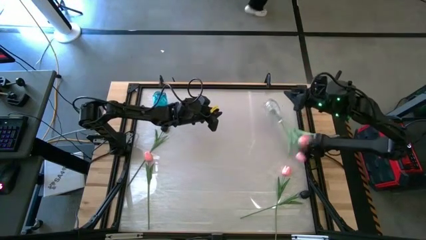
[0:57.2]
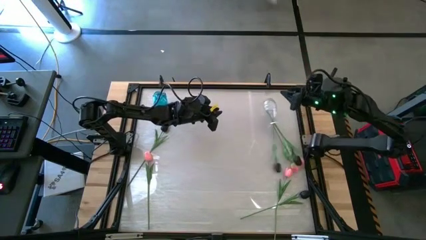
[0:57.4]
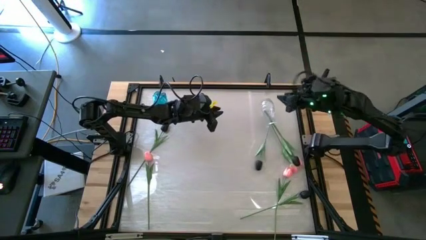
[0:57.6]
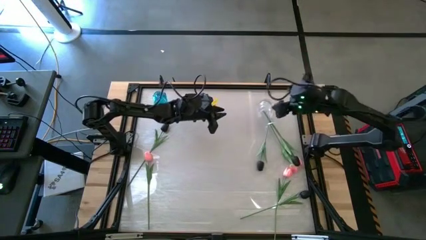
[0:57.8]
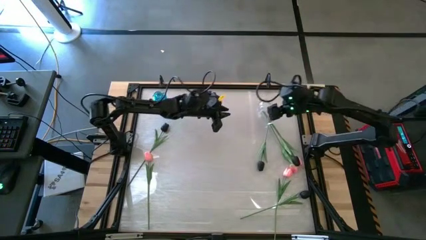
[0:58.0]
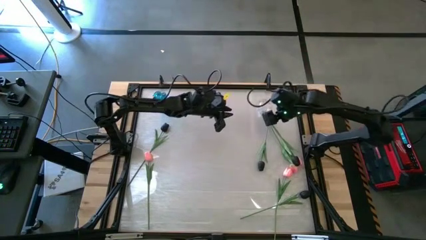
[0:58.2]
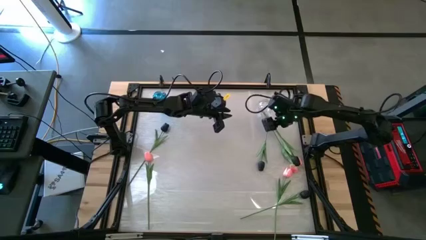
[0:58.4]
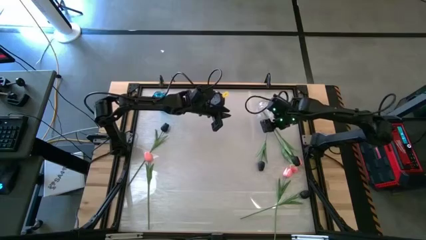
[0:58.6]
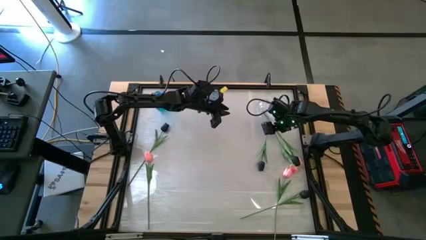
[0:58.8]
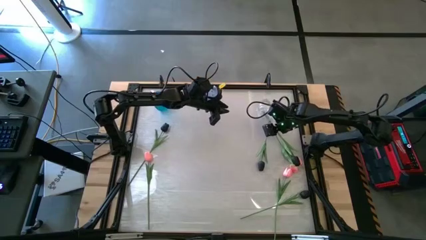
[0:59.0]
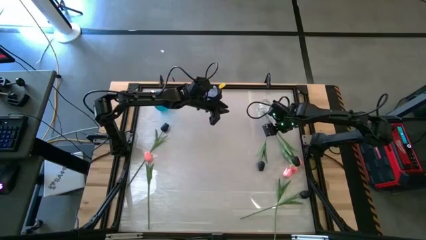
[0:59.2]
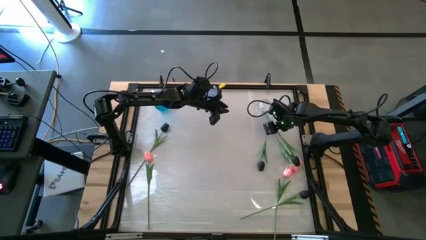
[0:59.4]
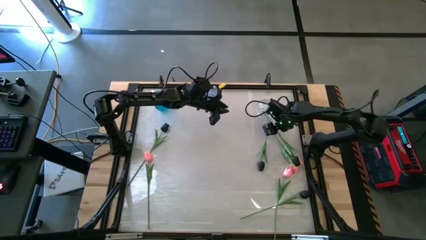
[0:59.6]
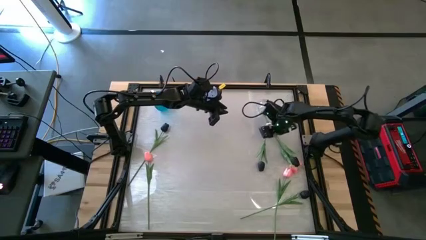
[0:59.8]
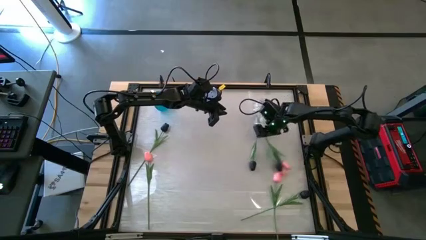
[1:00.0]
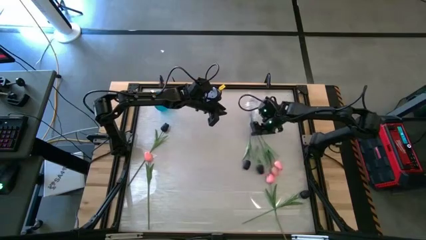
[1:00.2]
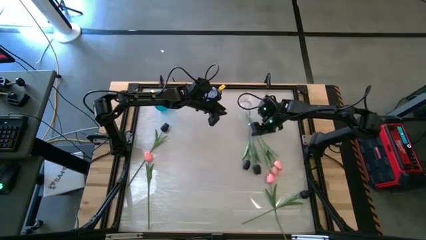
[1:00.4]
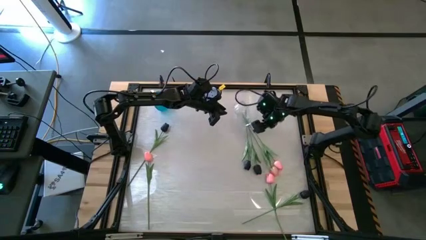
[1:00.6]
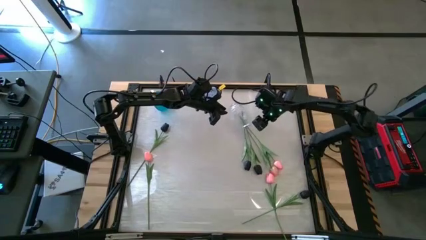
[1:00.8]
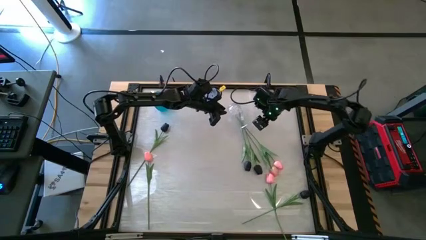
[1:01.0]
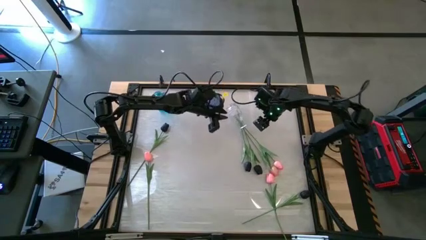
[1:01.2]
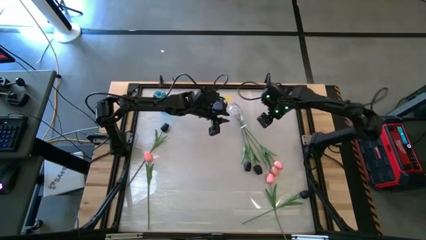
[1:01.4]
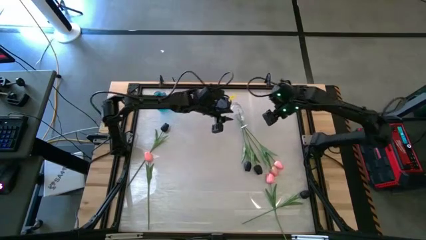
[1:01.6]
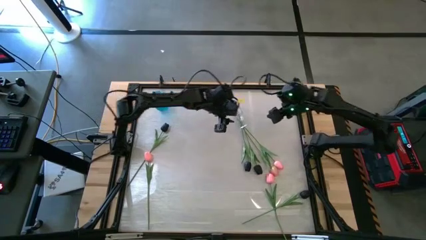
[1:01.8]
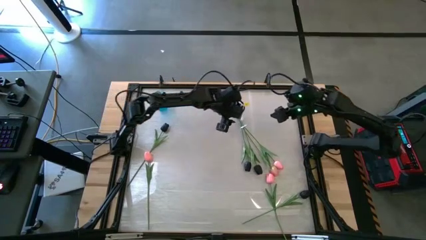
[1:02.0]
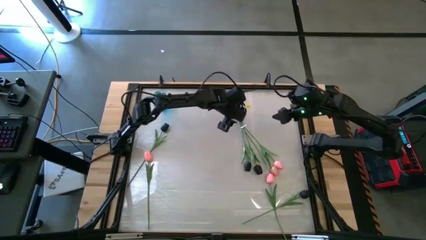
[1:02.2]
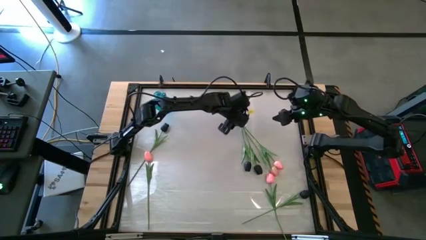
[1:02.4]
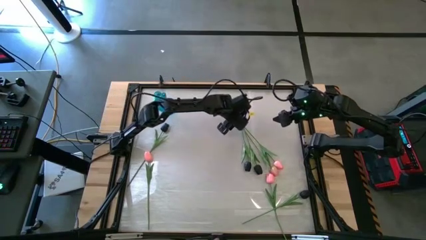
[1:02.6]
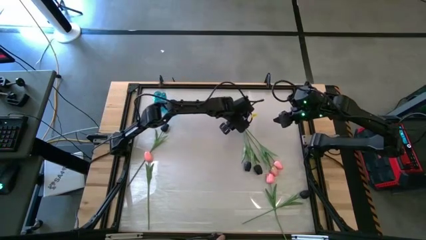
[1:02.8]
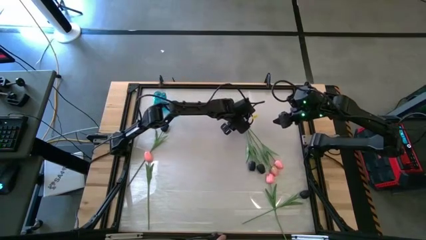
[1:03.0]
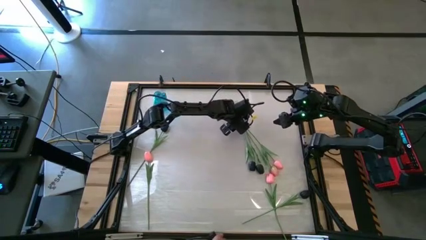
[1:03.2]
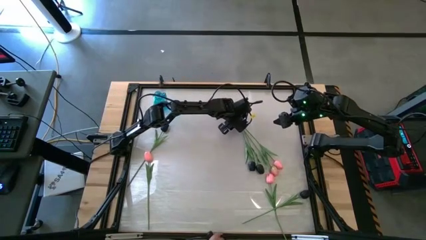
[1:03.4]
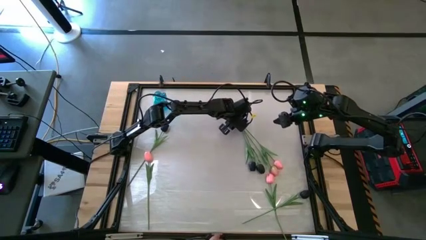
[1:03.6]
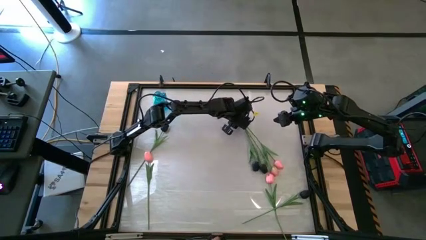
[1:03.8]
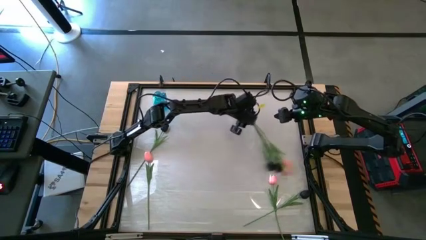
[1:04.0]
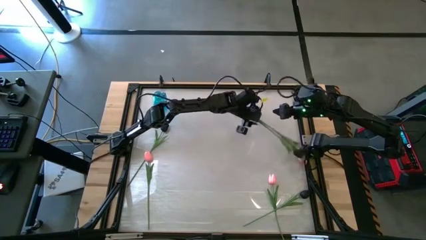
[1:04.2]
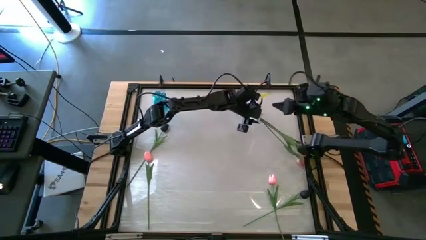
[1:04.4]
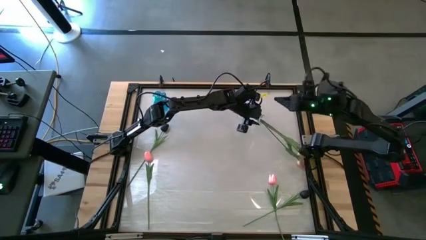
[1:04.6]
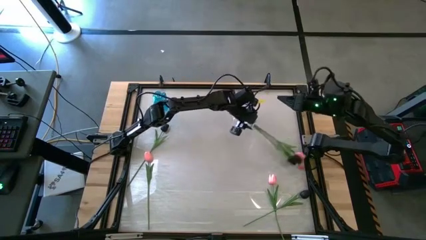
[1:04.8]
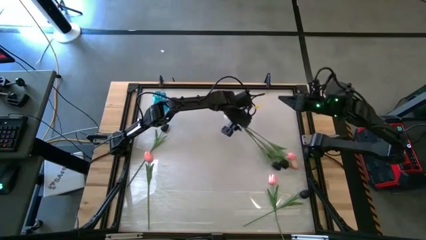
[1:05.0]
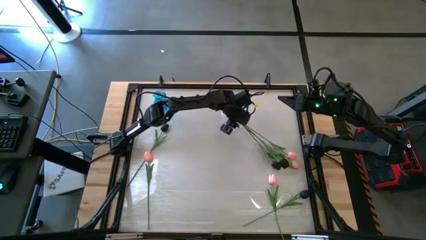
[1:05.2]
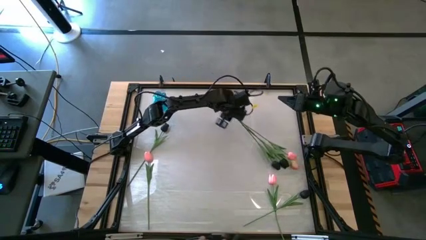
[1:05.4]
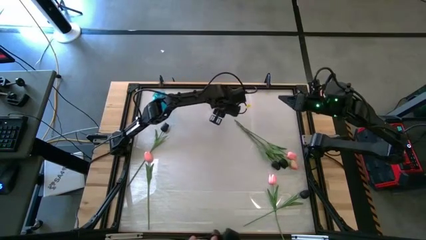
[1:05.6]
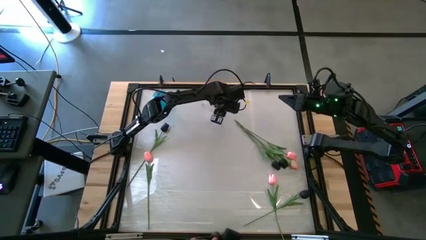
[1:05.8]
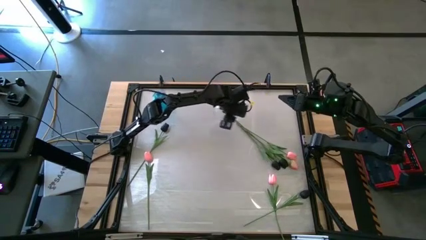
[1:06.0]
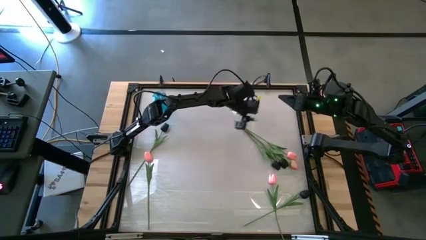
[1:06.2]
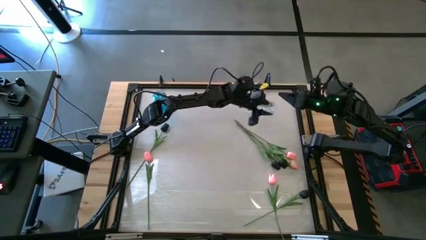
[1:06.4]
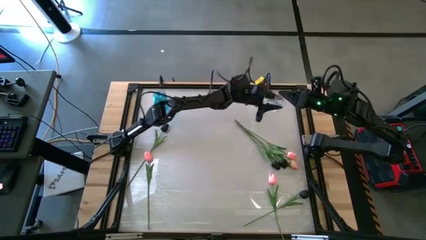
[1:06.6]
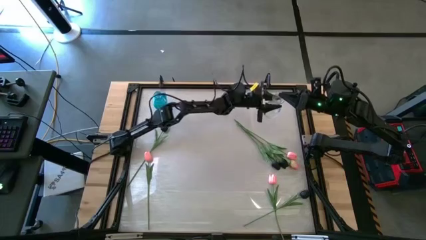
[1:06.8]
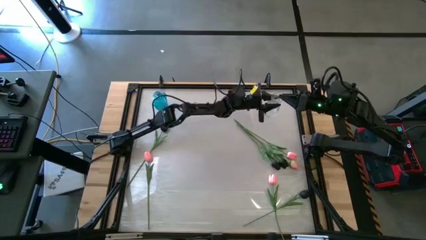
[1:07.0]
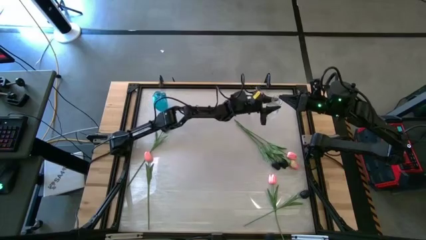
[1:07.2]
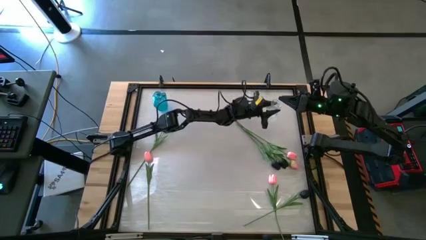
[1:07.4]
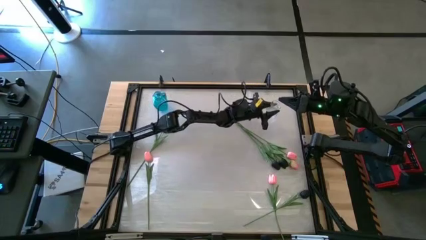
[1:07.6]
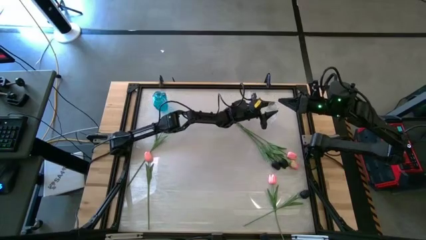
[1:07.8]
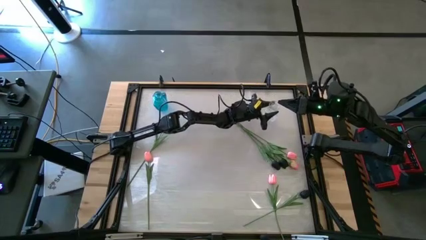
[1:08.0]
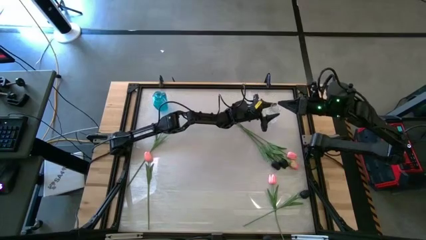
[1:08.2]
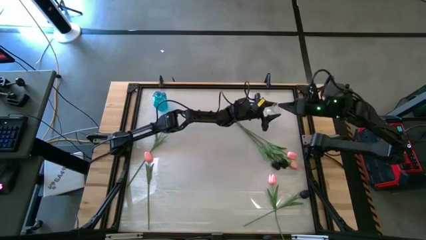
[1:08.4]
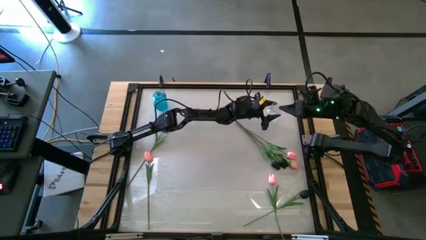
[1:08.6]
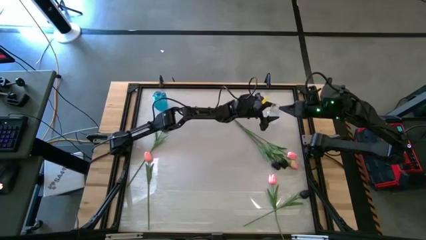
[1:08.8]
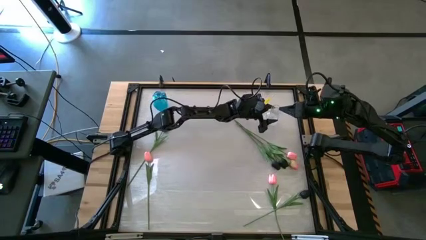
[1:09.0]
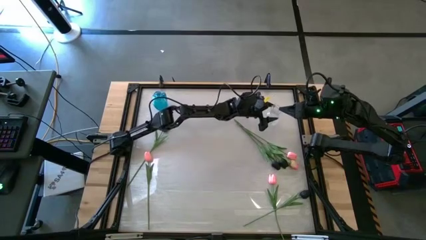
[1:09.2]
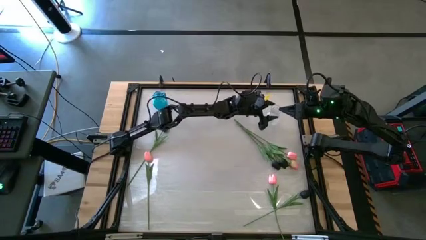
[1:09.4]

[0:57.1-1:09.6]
Task: Sort flowers into vase by color
Adjust the transparent vase

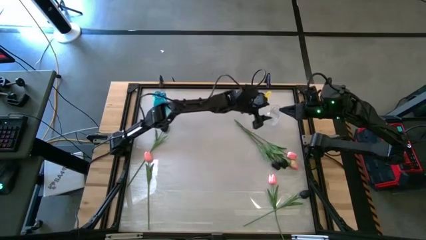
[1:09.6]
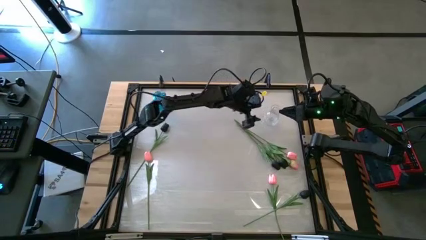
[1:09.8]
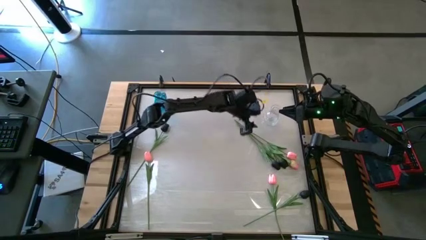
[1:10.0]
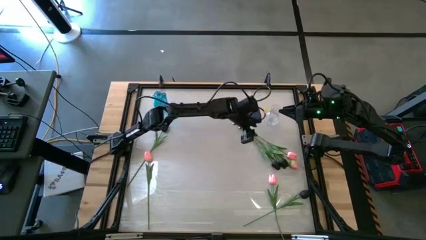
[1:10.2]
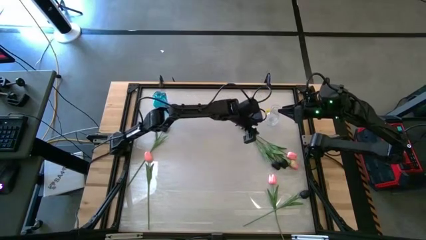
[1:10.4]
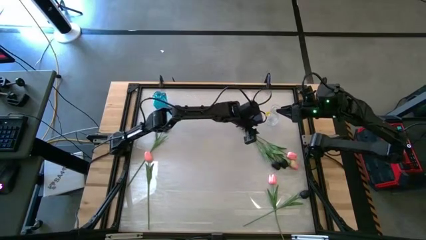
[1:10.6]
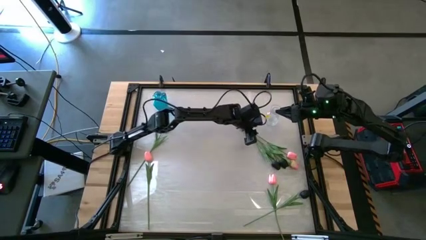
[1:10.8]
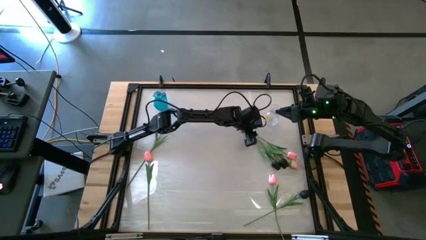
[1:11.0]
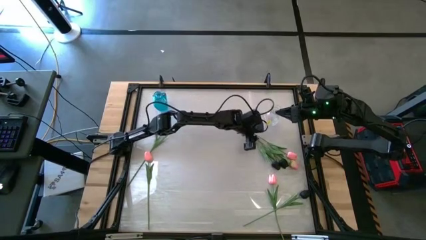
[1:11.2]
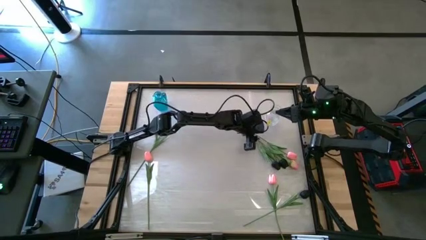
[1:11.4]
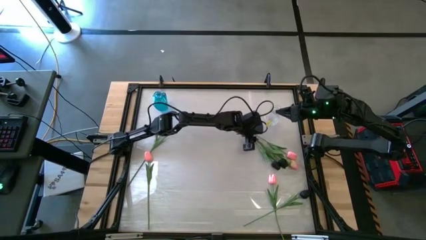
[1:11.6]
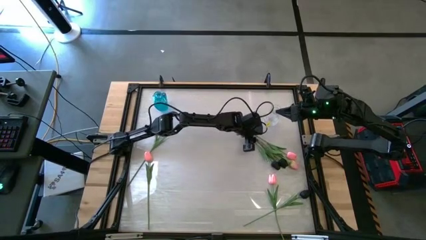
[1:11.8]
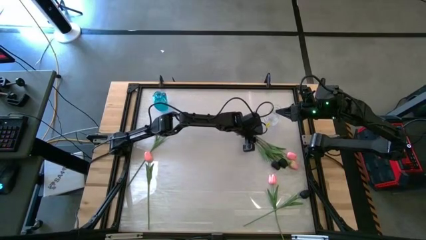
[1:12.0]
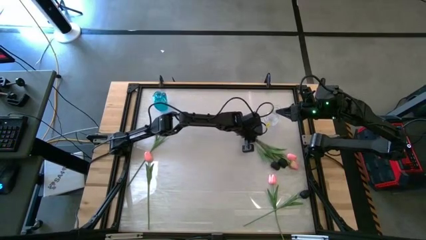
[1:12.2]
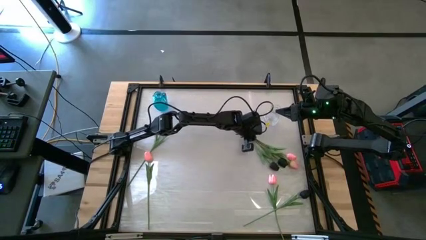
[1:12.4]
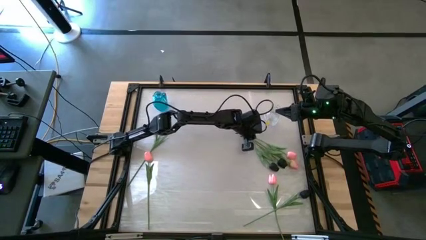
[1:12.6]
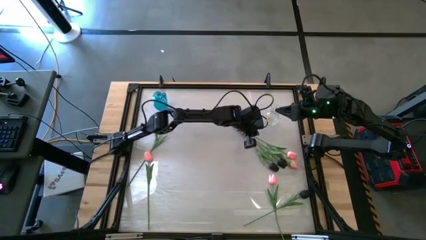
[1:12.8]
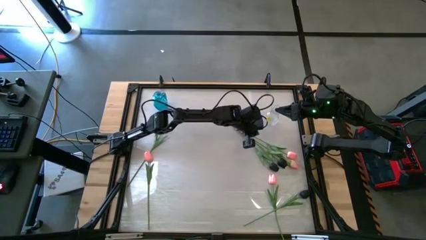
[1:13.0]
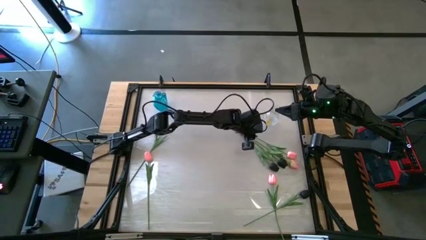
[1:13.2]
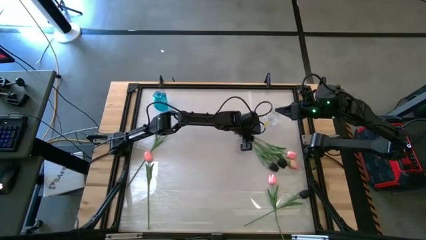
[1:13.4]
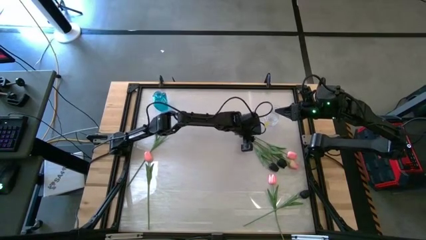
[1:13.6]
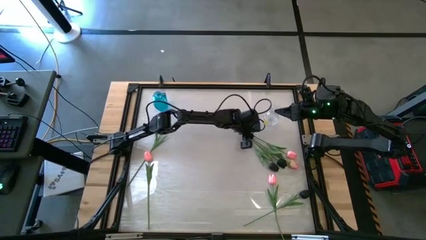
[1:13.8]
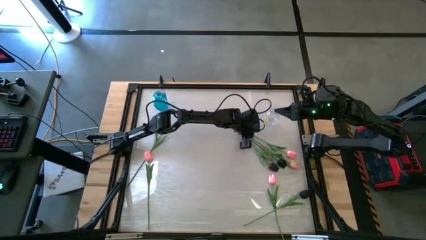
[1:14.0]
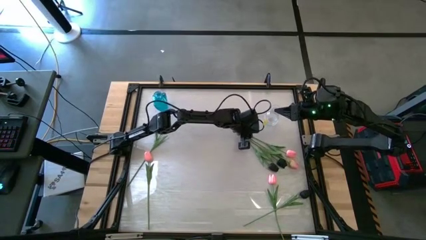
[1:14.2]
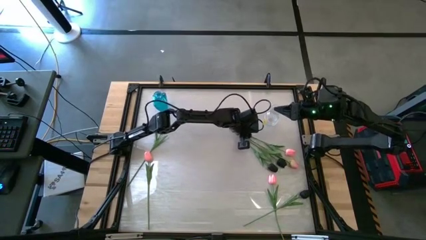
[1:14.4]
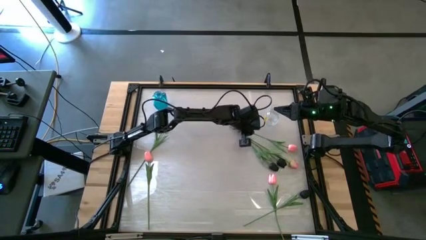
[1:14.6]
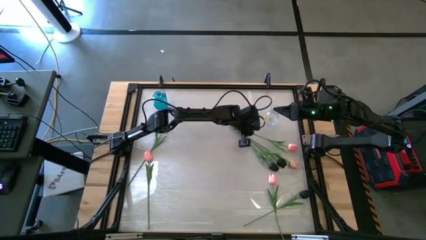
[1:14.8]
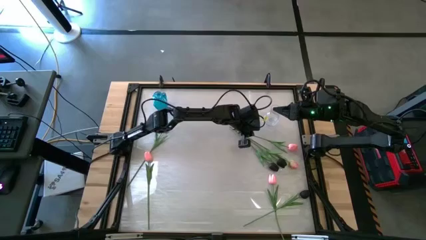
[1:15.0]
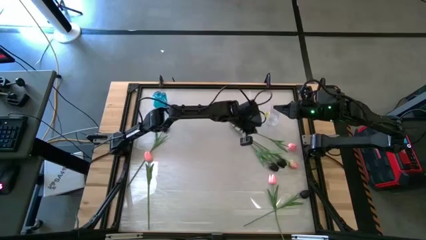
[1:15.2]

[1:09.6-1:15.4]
Put the pink flower into the transparent vase
